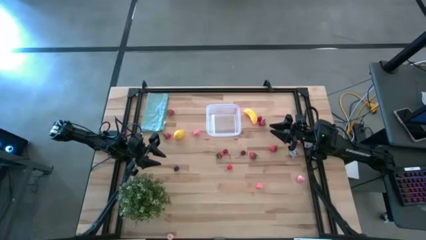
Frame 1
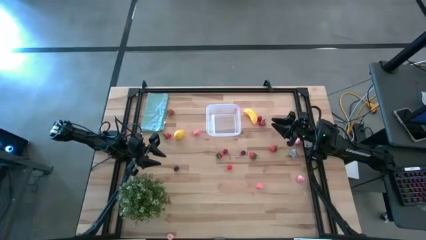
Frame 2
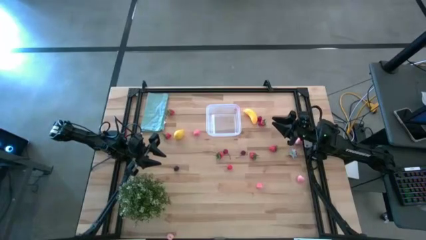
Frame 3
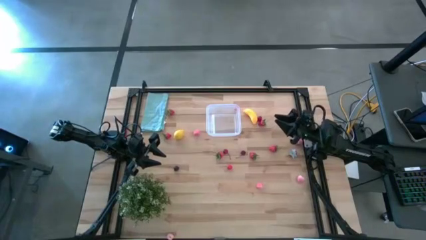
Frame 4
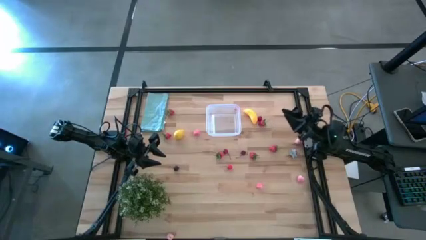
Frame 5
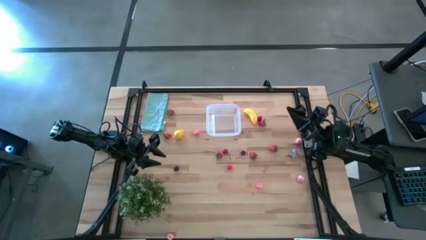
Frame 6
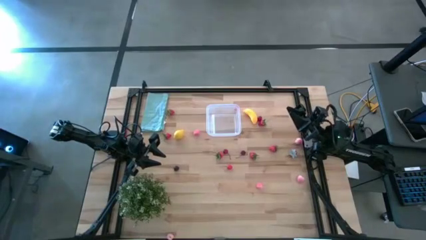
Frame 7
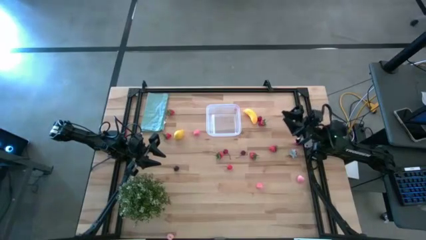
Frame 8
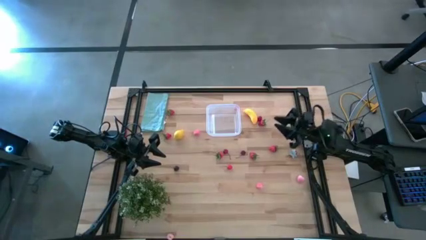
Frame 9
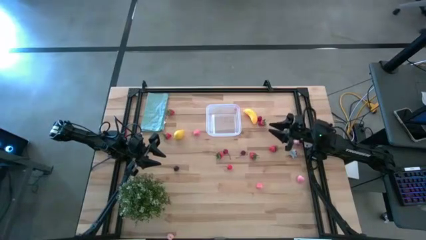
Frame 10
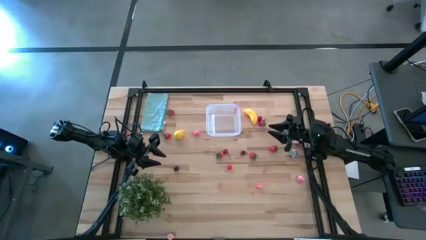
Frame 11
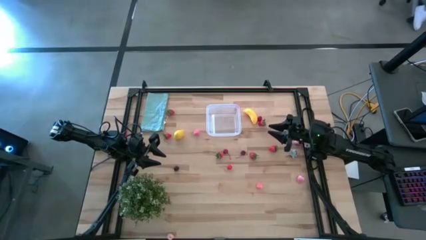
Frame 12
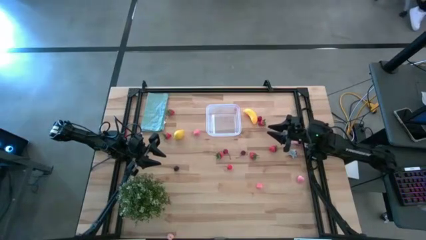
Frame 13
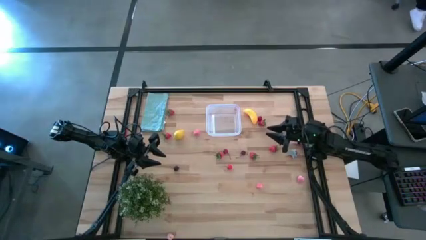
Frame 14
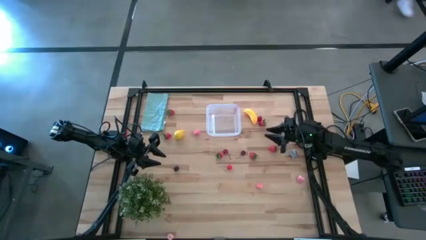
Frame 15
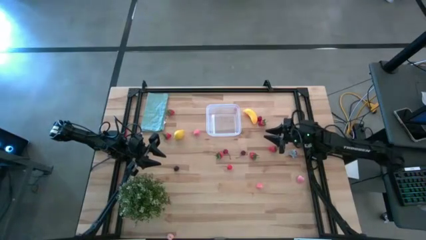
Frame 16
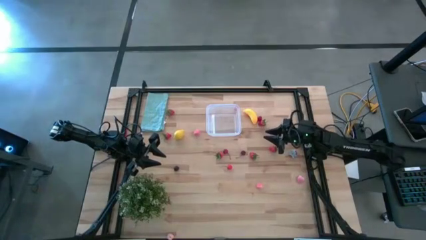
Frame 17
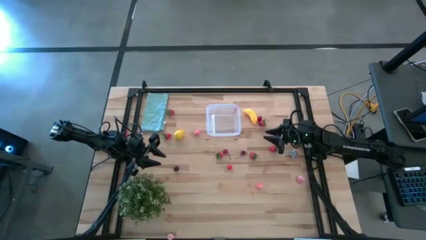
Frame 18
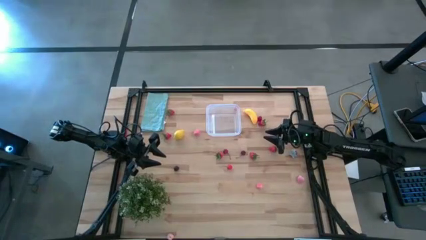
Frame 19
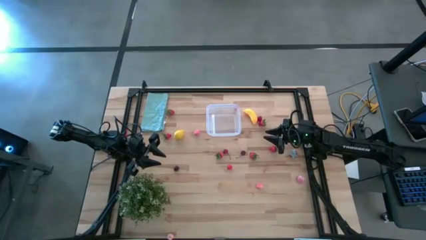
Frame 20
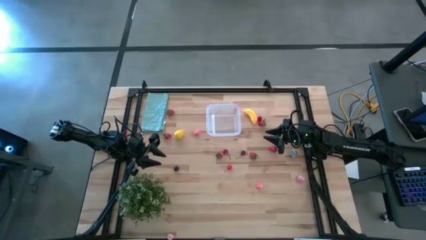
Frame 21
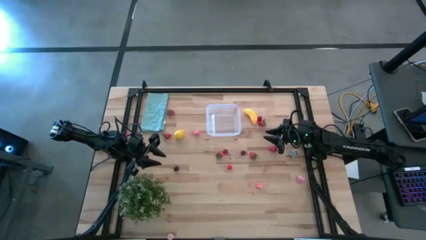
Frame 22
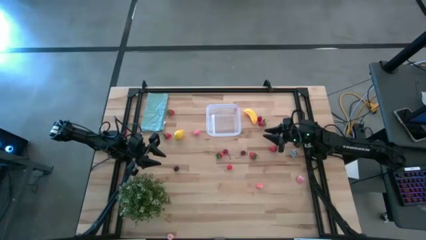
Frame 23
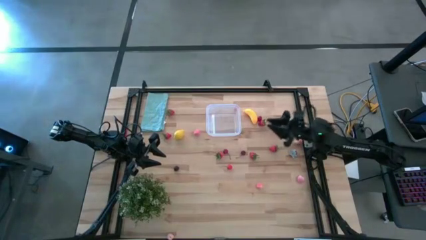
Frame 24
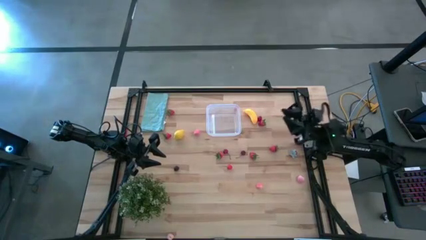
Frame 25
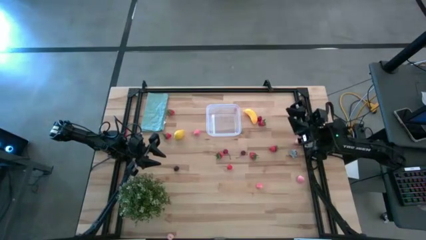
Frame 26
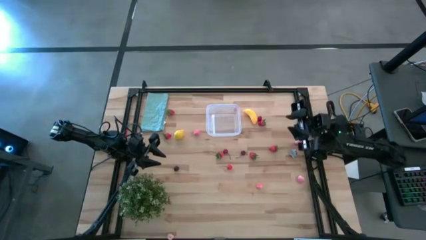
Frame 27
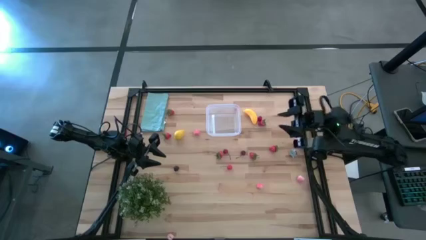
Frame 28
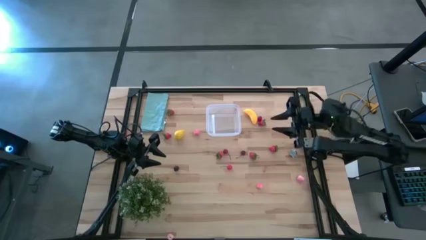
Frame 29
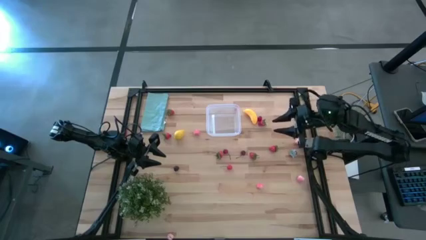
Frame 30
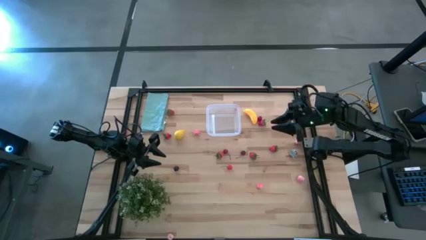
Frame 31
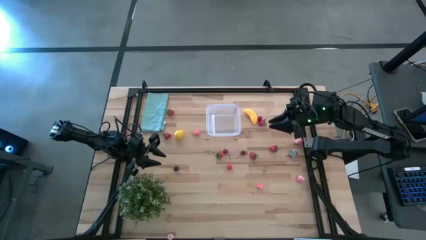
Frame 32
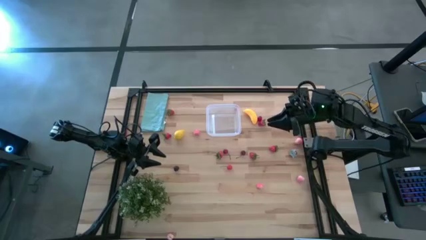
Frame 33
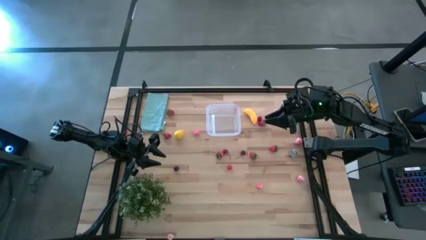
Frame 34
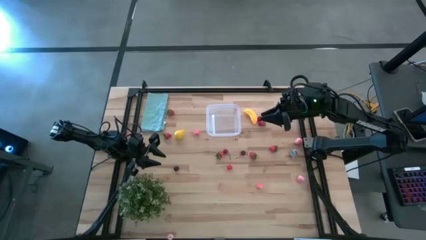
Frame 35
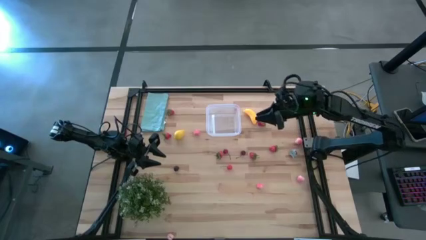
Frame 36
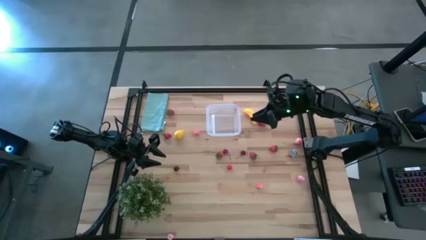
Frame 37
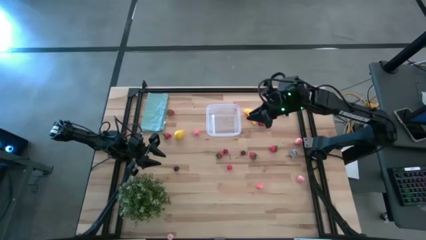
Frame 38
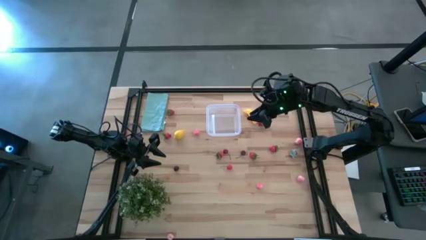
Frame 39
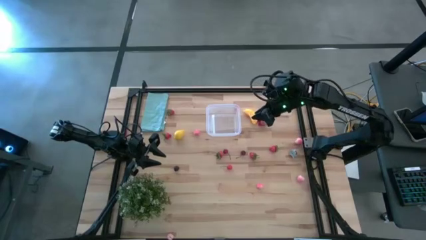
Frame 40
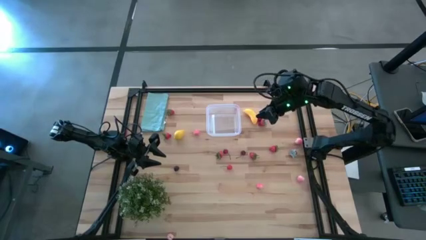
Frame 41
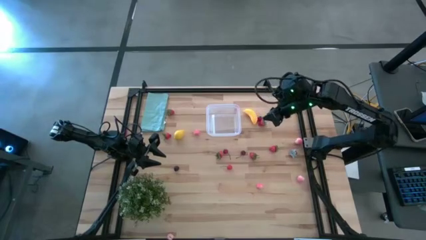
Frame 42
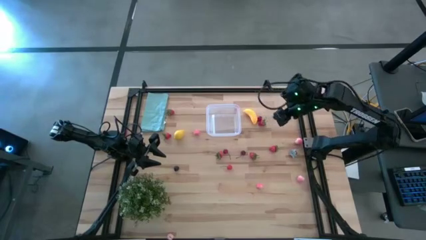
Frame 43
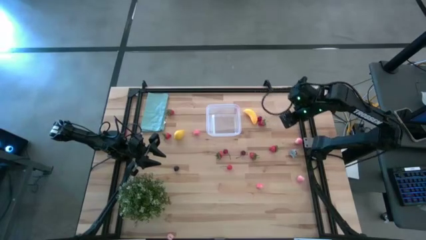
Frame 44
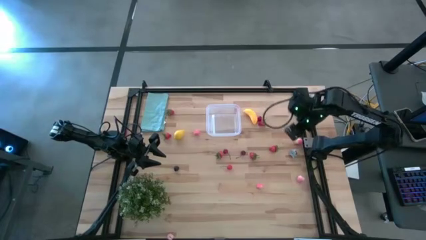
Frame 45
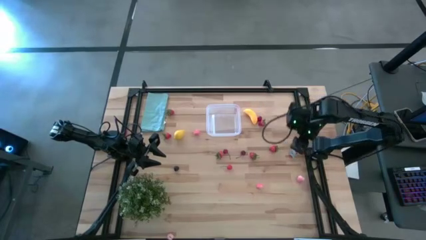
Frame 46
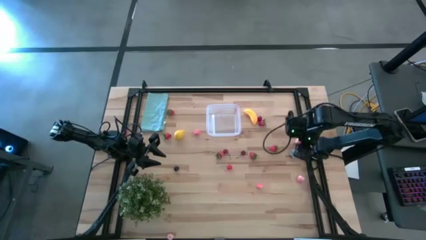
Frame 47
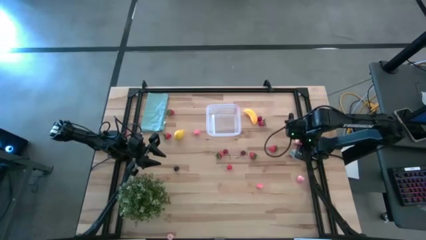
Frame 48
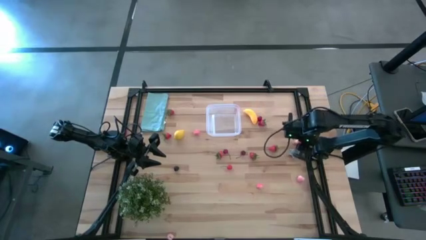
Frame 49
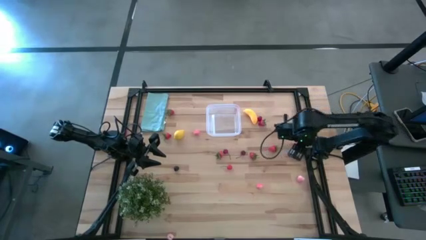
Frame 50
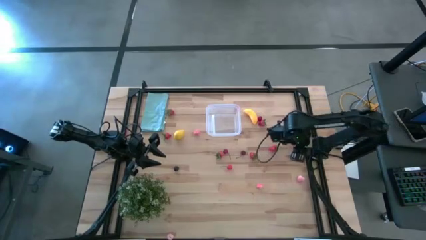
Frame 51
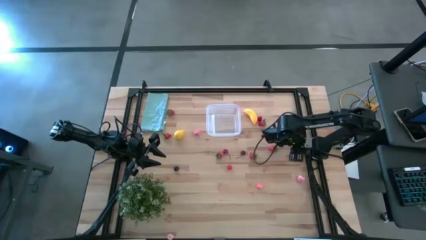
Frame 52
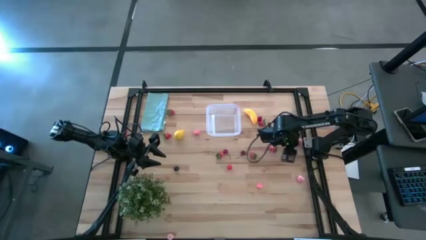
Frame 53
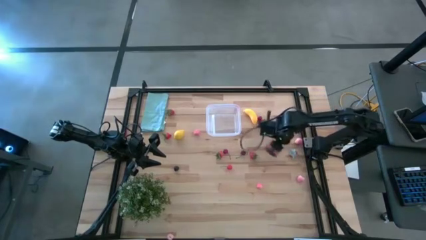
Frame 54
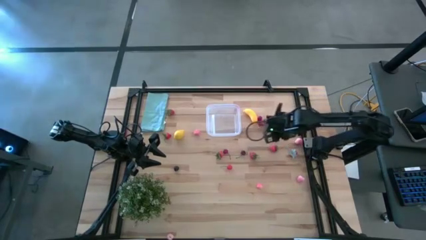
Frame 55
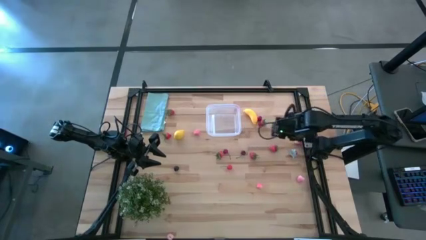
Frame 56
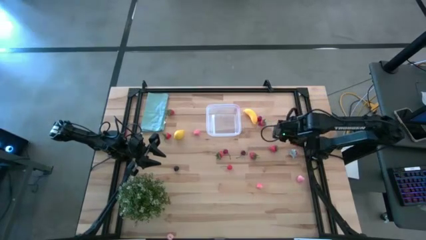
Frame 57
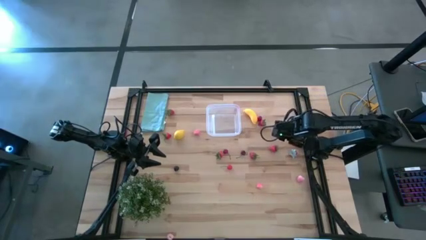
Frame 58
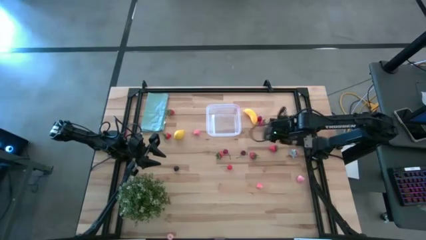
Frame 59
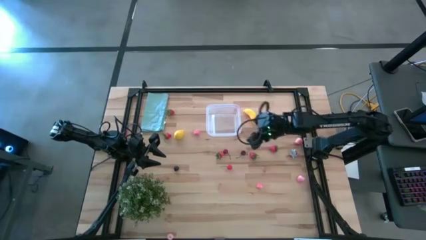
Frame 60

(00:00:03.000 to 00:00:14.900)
Task: Pick and placing Produce into tupperware
Put the pink peach into the transparent bin
